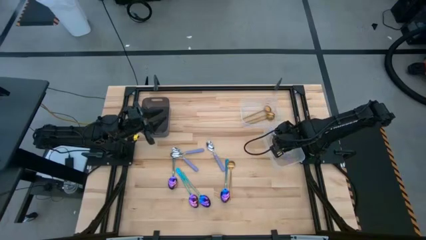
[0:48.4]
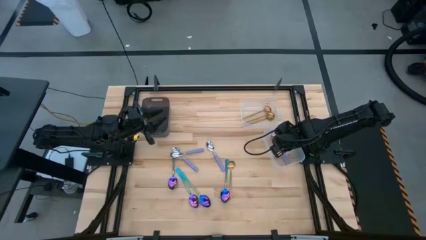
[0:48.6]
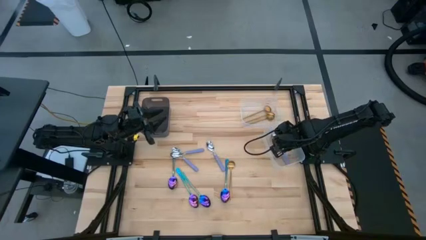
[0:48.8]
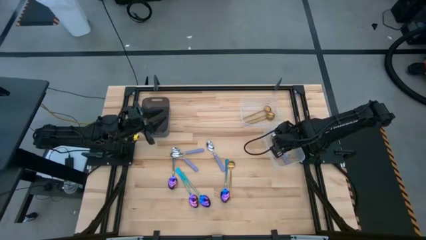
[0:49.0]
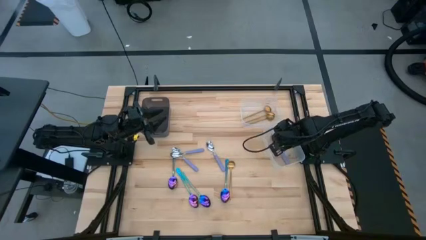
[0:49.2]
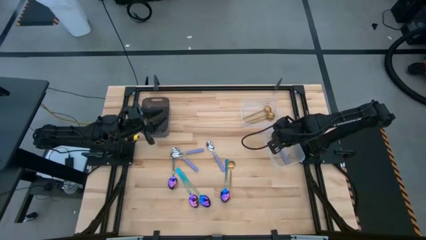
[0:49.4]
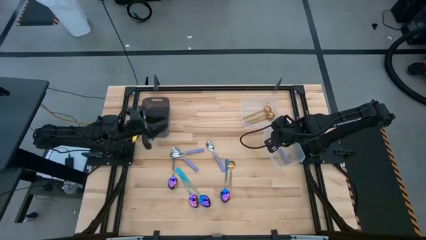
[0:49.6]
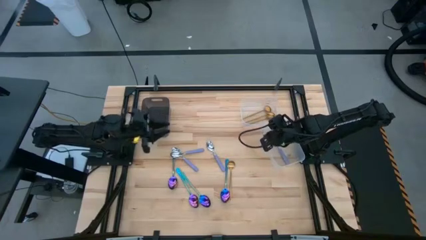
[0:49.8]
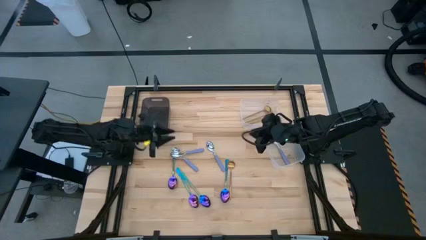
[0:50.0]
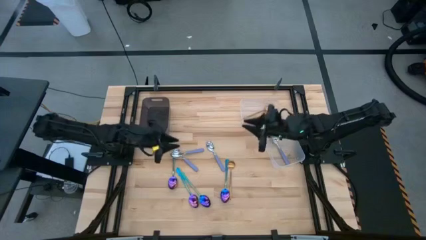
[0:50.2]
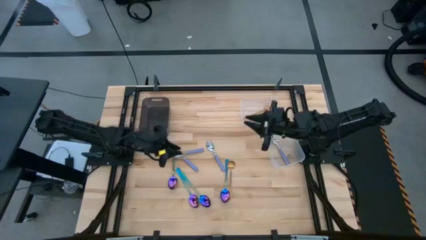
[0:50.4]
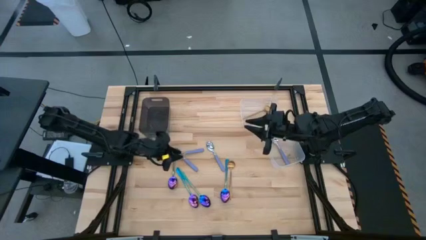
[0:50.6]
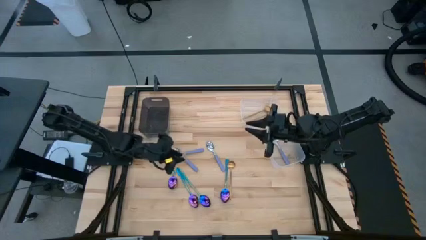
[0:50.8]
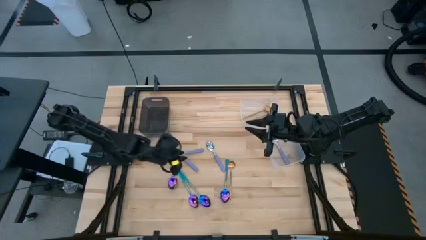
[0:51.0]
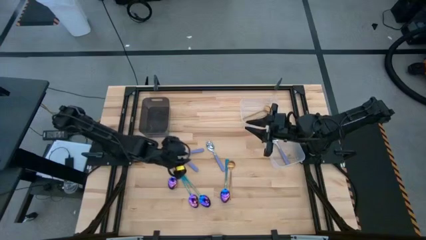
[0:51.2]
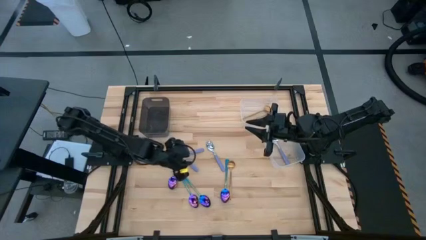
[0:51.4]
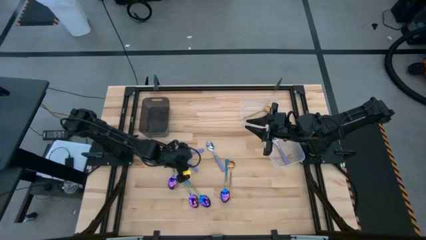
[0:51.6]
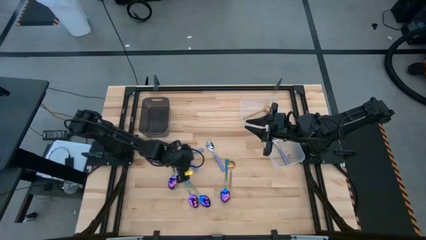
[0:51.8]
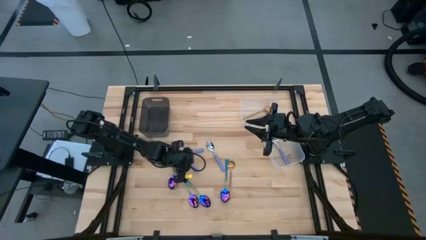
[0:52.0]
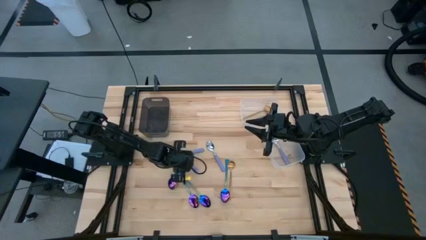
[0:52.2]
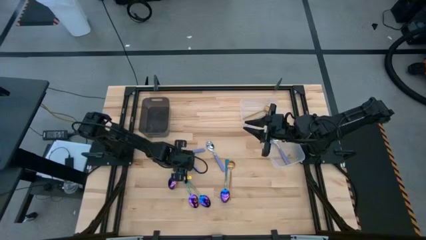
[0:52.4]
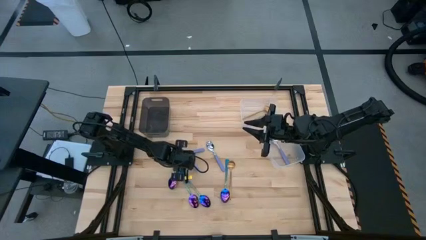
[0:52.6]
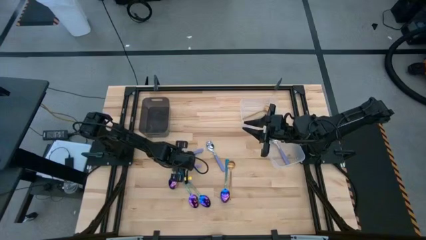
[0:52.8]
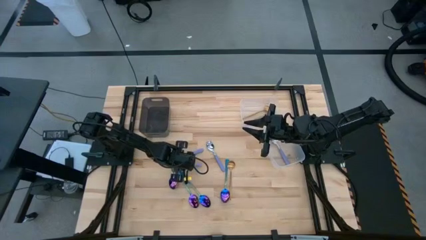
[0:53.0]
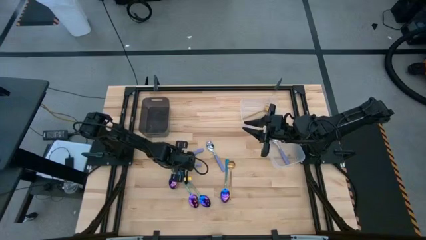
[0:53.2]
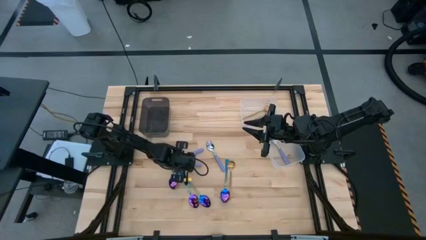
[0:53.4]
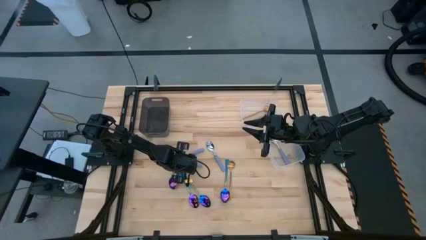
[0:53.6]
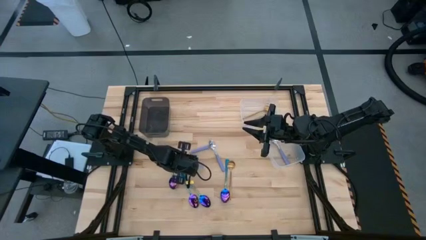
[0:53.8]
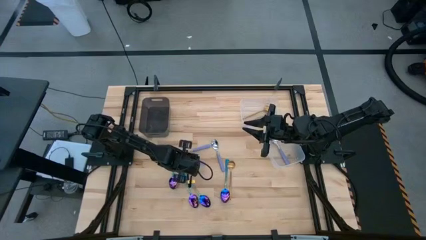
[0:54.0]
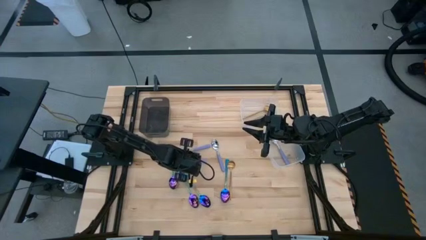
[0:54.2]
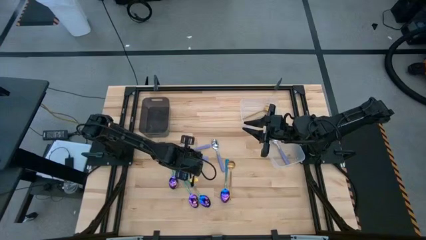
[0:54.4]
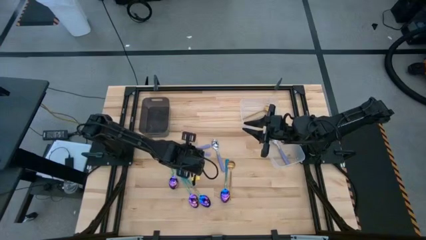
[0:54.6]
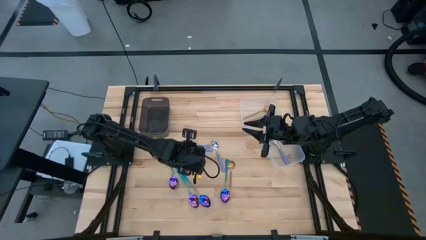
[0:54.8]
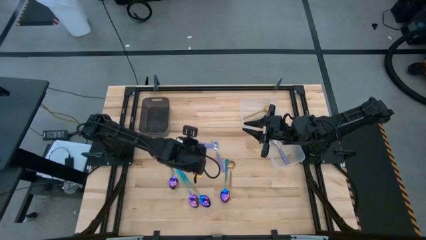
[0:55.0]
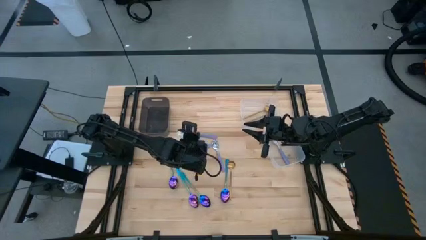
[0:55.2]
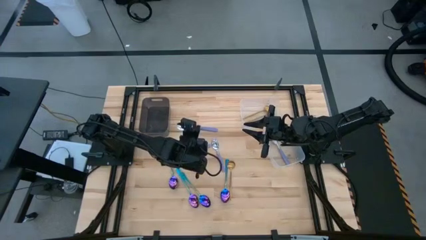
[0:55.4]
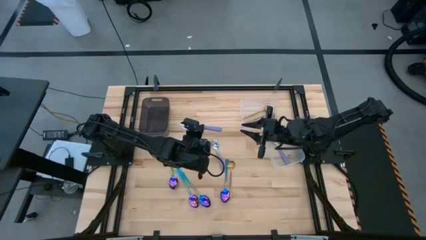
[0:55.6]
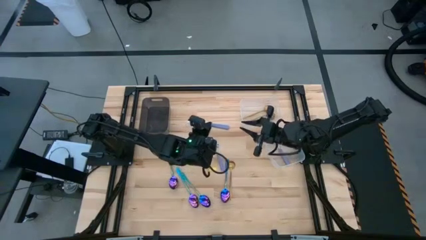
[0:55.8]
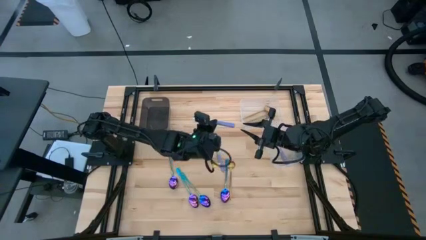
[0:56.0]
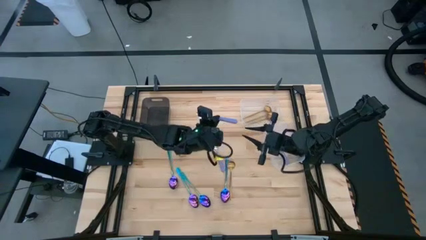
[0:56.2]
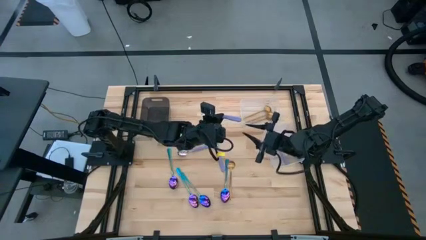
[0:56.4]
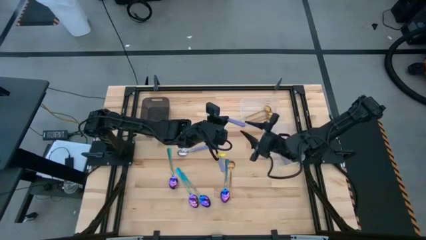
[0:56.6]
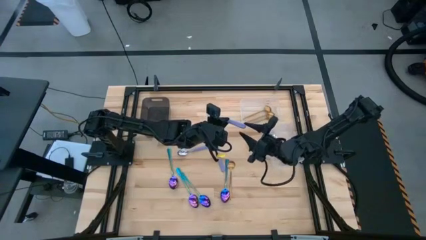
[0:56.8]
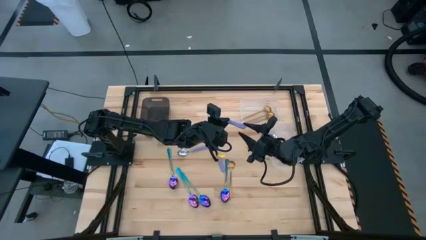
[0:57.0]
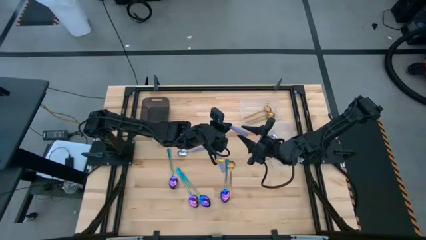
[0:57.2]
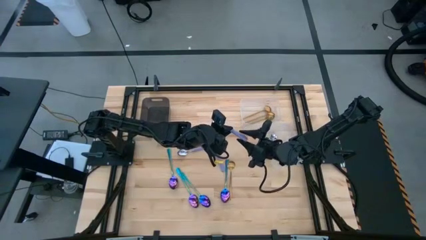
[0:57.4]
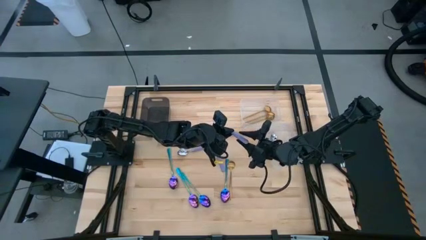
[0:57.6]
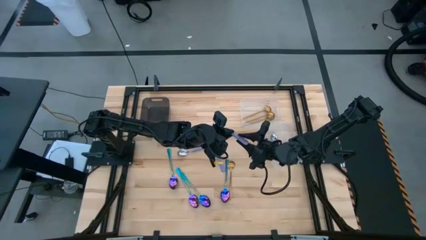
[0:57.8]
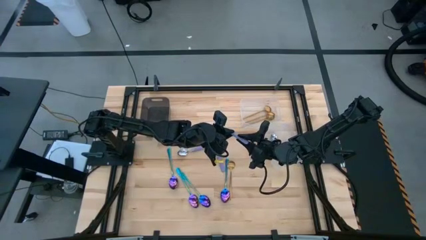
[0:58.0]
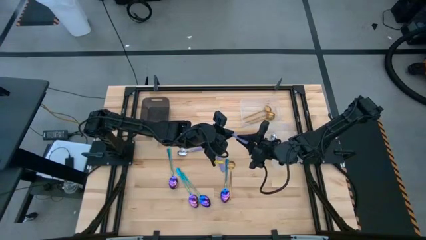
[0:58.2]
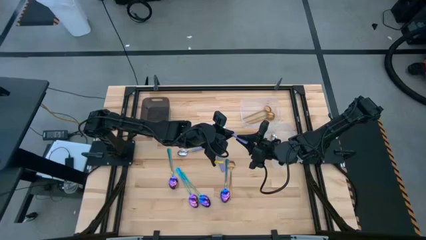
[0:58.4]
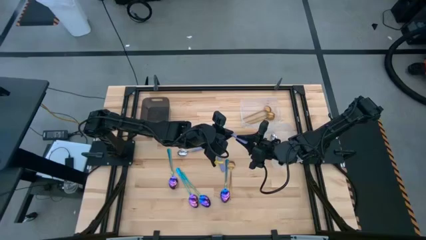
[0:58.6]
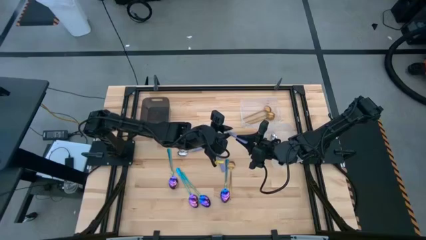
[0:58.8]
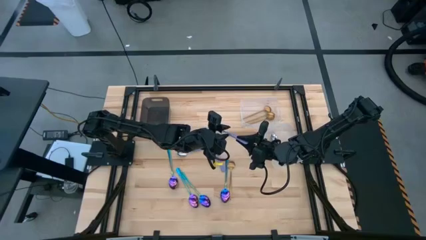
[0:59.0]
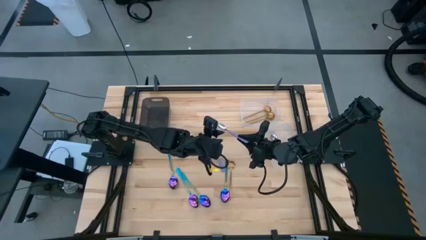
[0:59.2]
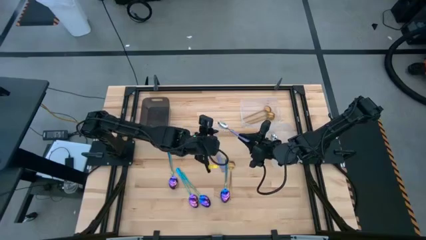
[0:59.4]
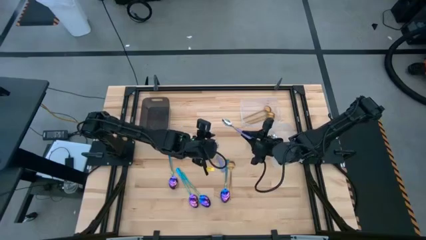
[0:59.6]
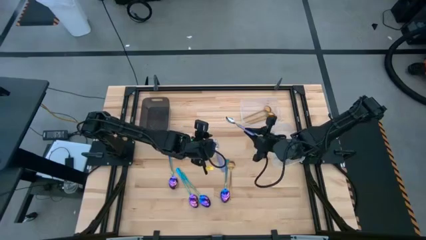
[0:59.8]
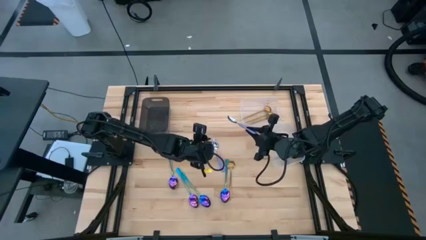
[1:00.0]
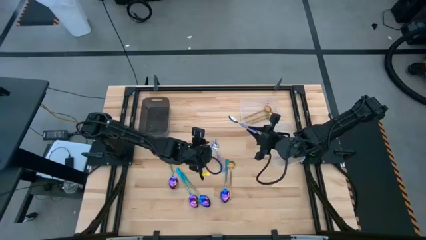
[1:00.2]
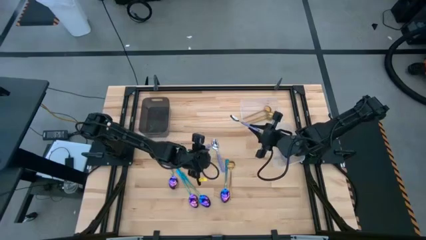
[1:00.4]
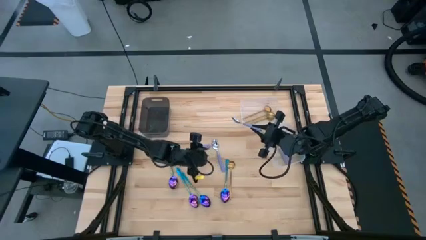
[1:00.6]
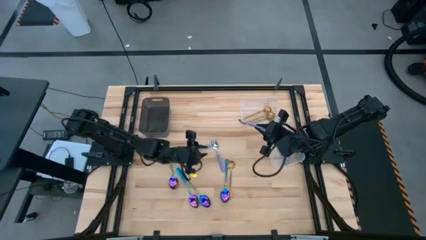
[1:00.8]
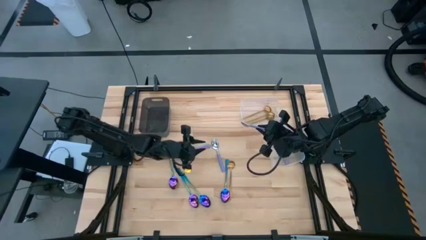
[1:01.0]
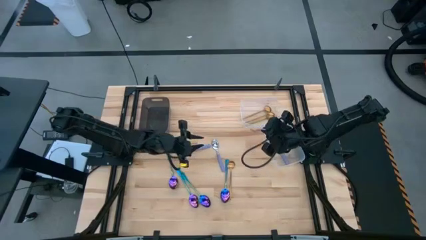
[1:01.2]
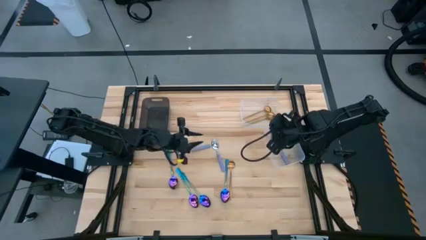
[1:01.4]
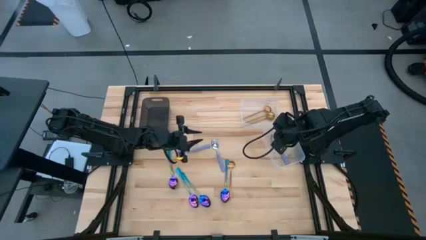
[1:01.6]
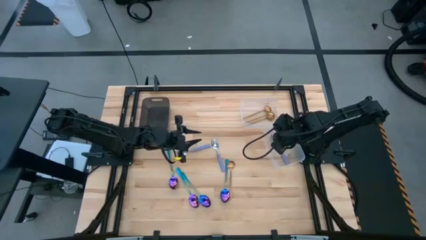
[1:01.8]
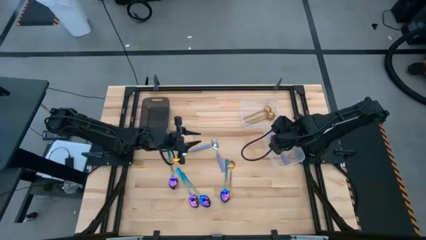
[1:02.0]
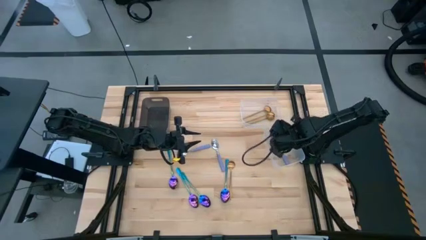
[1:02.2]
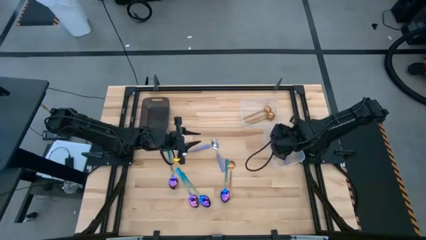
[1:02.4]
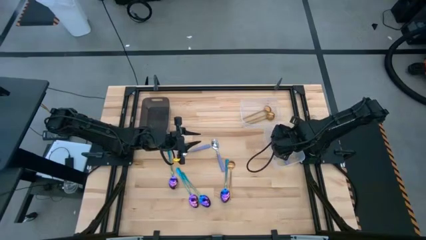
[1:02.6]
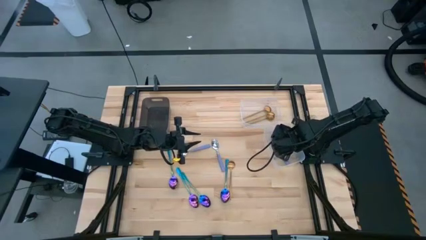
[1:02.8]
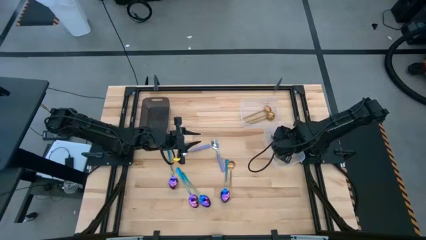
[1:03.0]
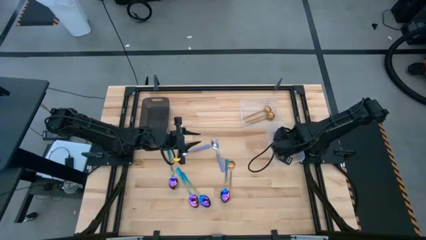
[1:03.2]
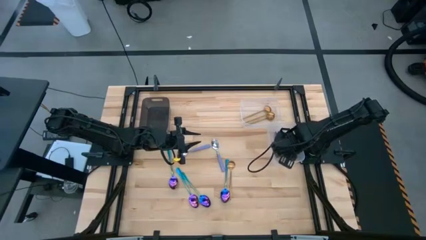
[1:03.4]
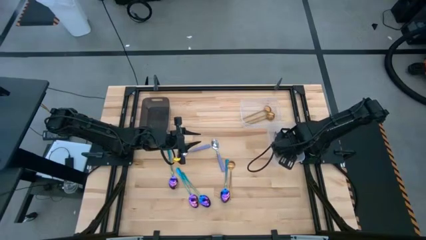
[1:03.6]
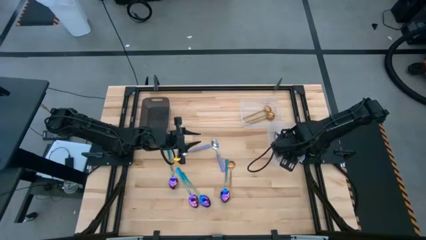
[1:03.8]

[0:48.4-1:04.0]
Task: Sort silverware by color (type)
Put the purple spoon into the bottom transparent bin

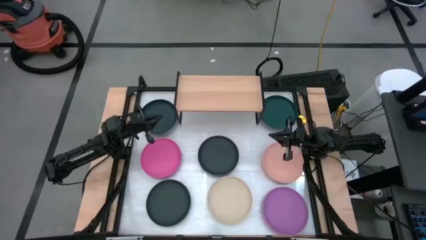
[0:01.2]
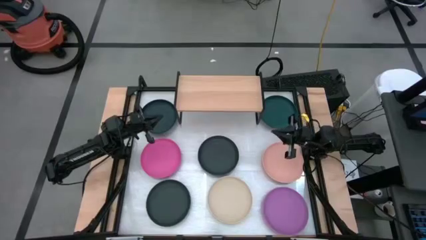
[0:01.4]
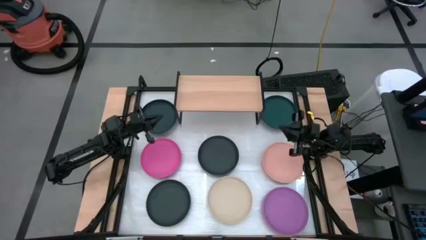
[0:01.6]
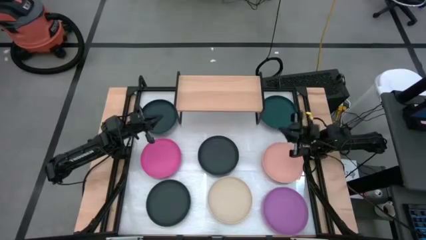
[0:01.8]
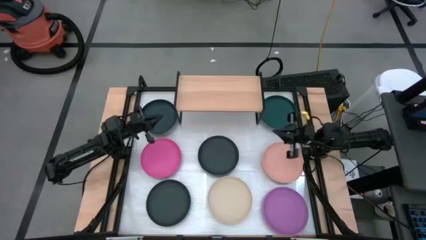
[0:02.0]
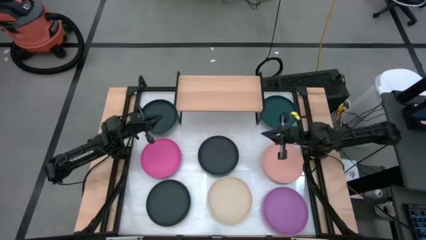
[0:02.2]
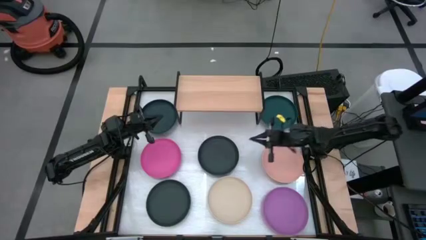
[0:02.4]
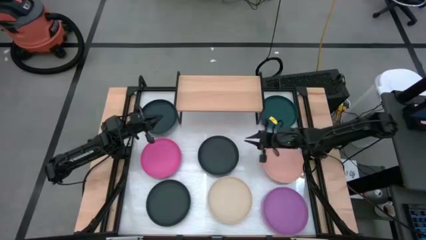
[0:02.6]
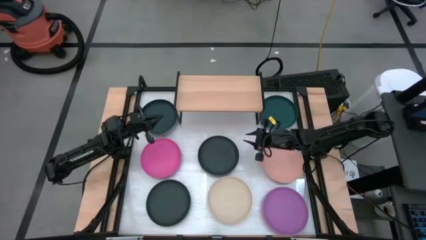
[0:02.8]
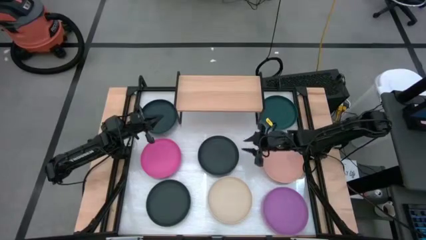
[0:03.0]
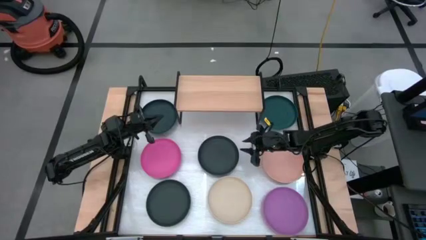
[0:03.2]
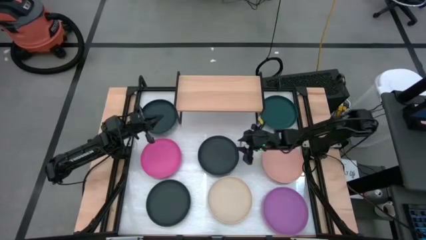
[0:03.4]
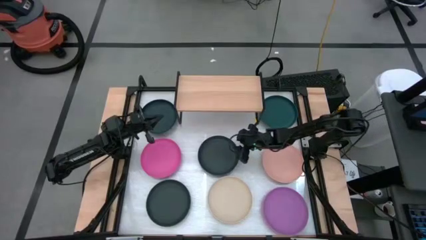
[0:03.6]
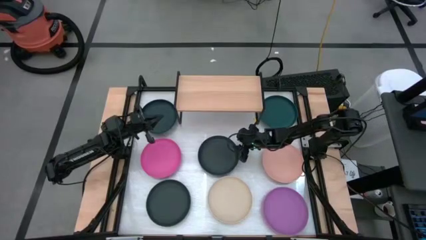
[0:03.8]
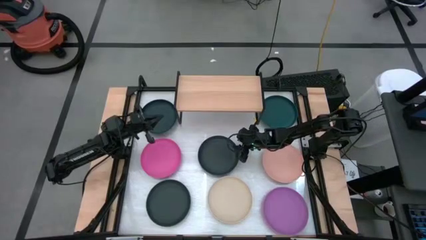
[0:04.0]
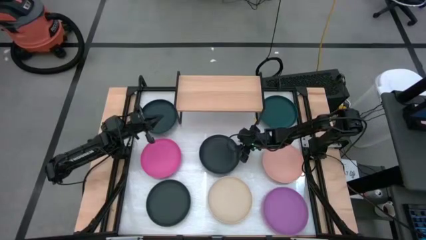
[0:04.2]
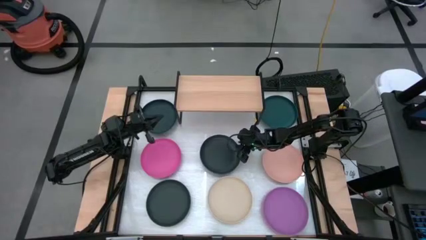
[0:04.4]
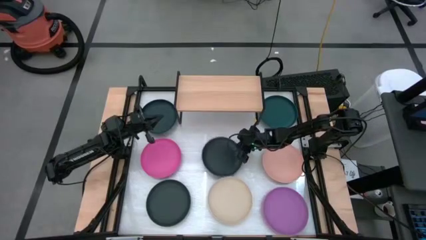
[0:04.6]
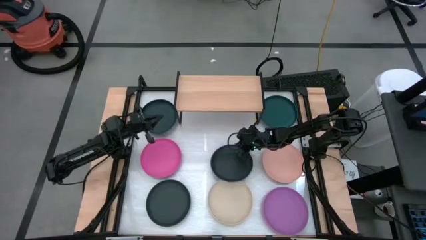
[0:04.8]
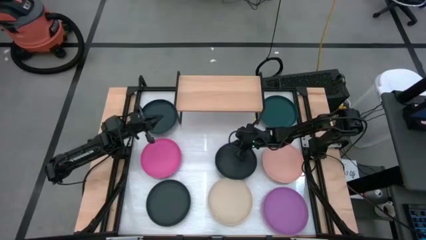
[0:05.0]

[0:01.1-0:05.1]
Task: Place and stack plates onto a shelf
Put the top black plate on the shelf
